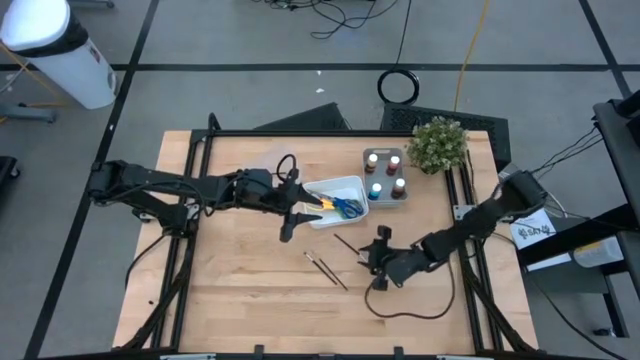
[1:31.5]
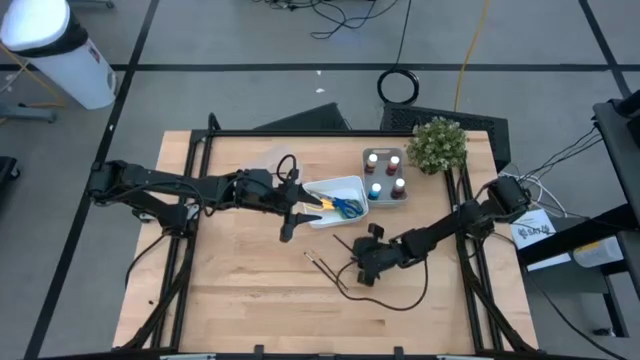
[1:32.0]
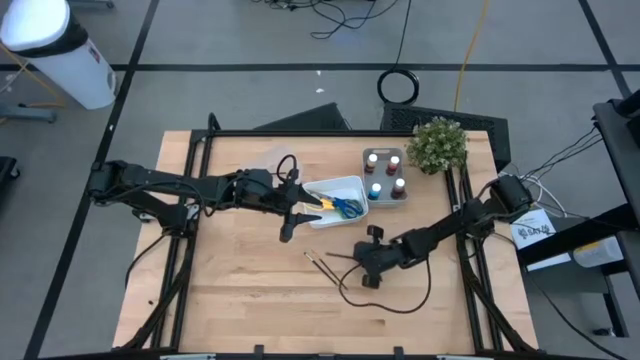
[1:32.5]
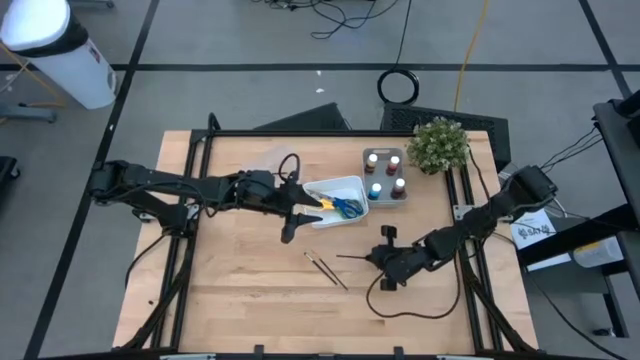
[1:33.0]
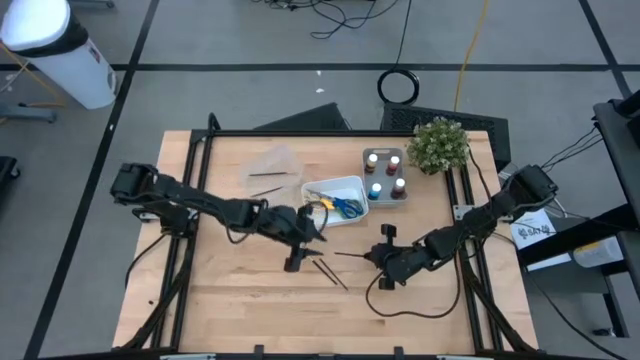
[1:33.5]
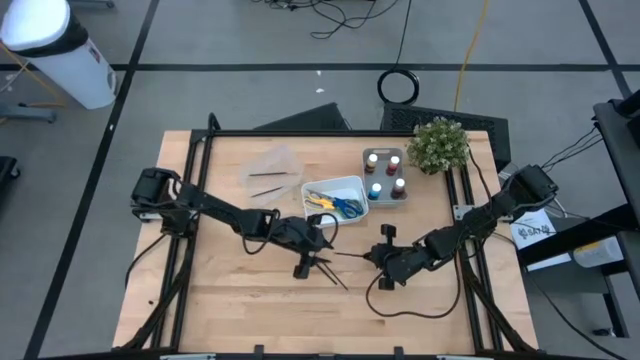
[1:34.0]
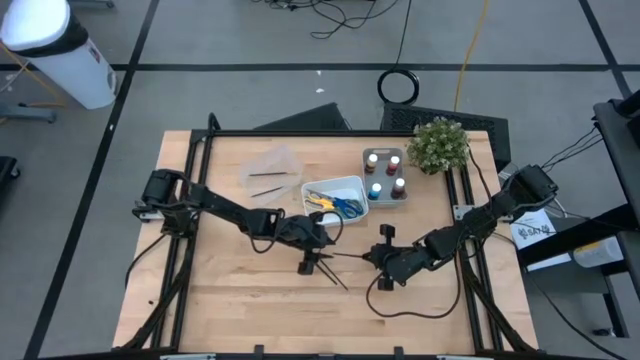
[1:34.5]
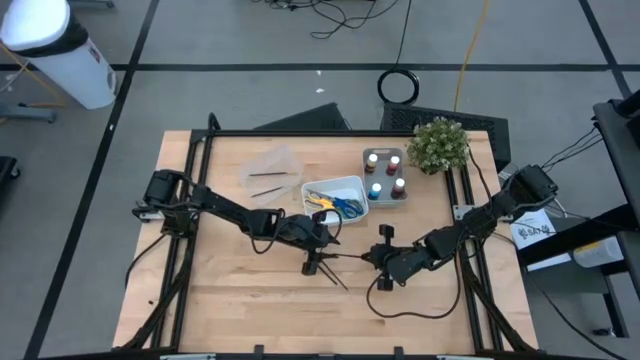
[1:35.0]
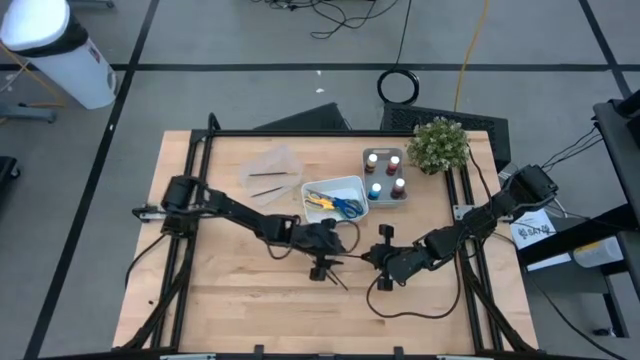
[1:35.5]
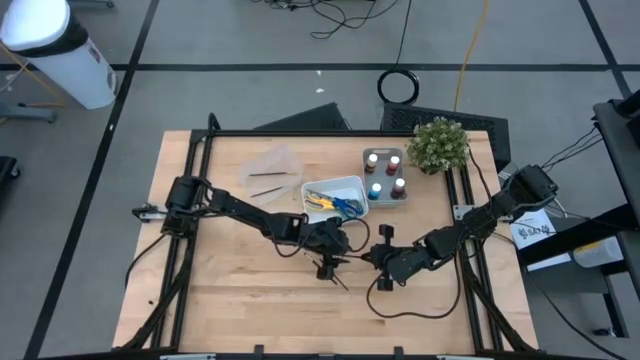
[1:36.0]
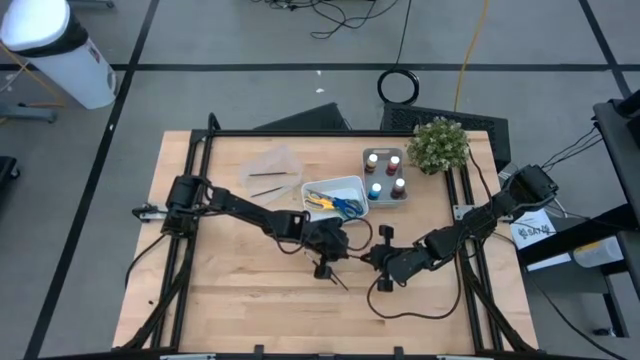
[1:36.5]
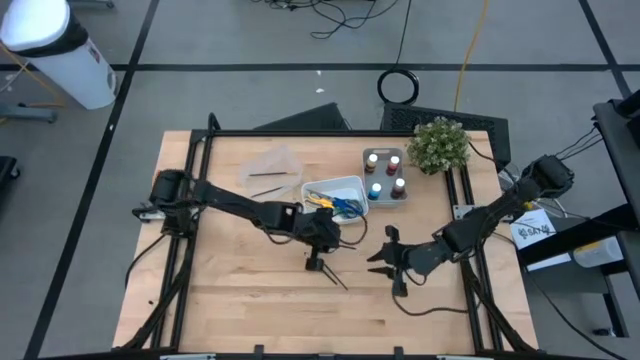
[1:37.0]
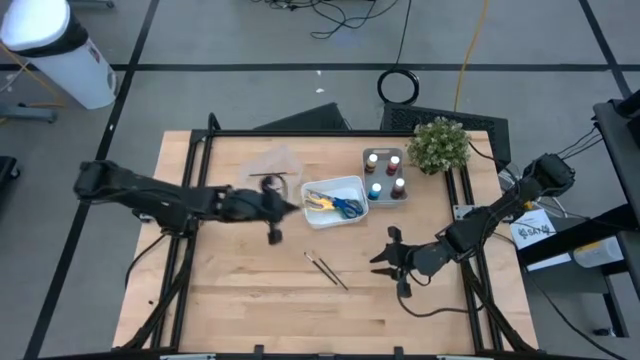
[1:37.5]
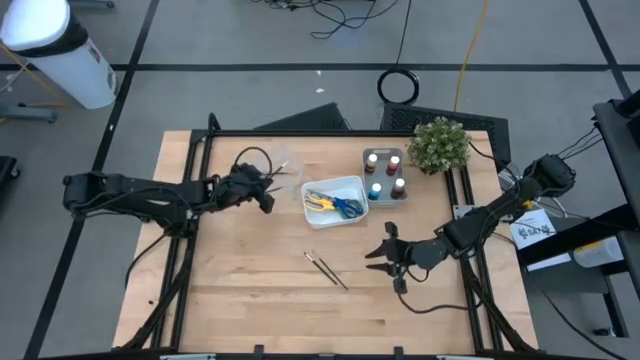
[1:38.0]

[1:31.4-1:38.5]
Task: Pick & Place Paint Supplies
Put the right silver paint brush in the transparent bin

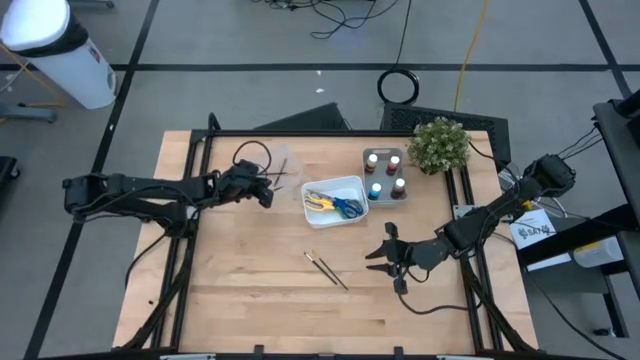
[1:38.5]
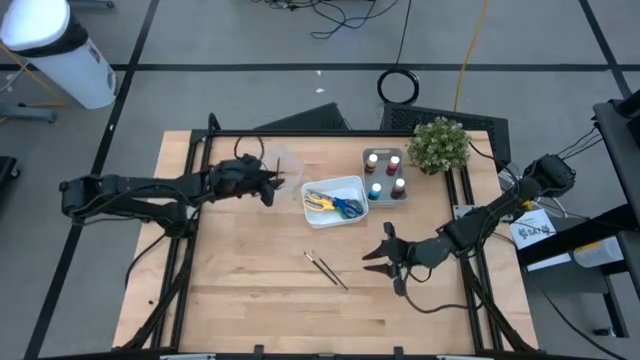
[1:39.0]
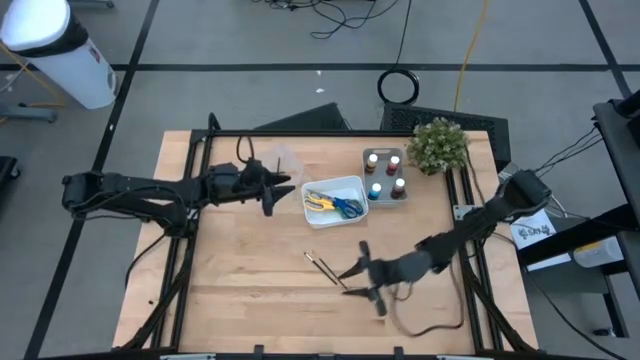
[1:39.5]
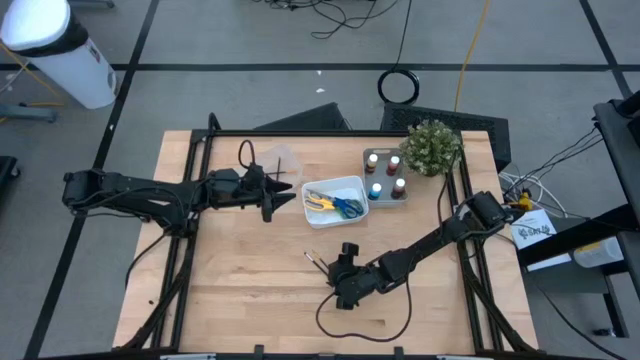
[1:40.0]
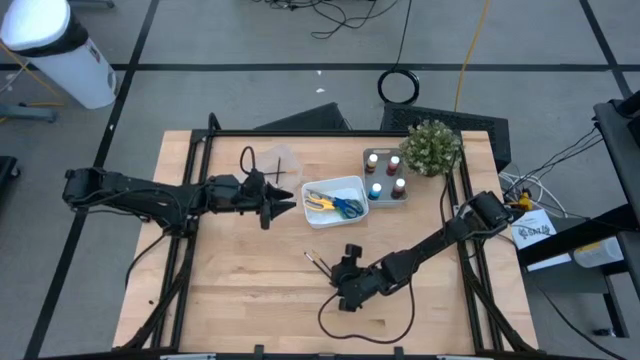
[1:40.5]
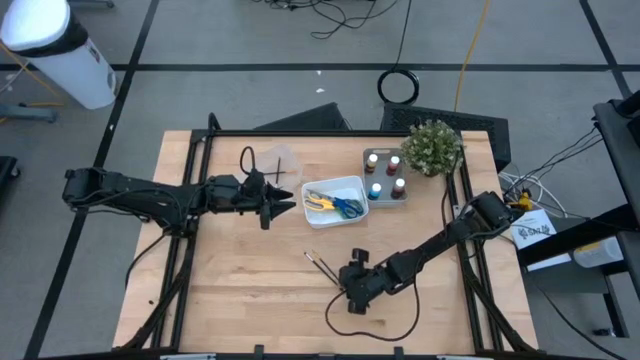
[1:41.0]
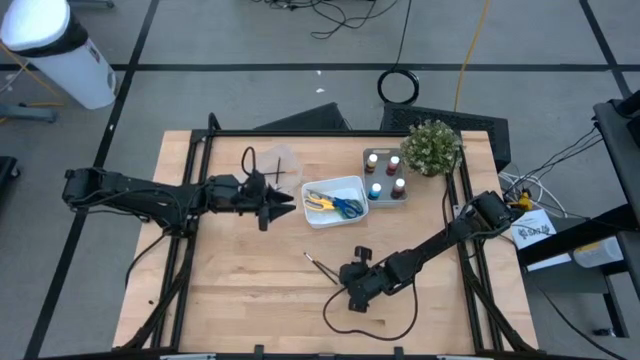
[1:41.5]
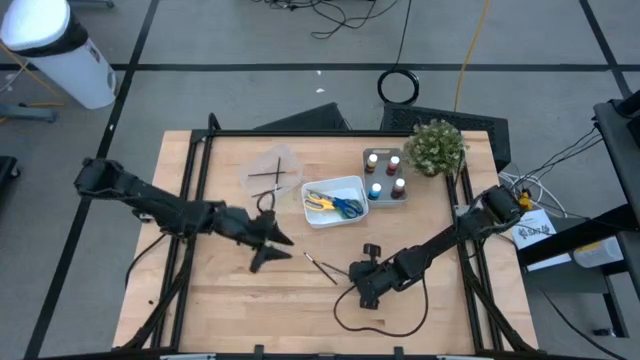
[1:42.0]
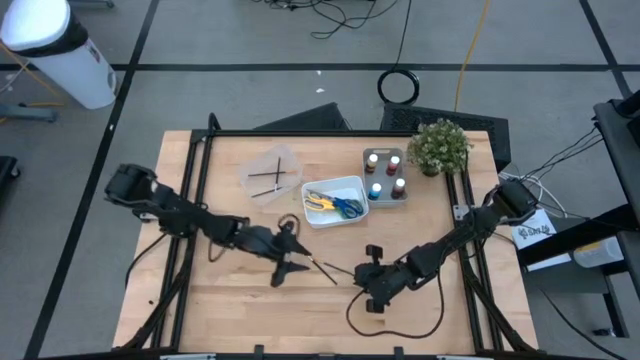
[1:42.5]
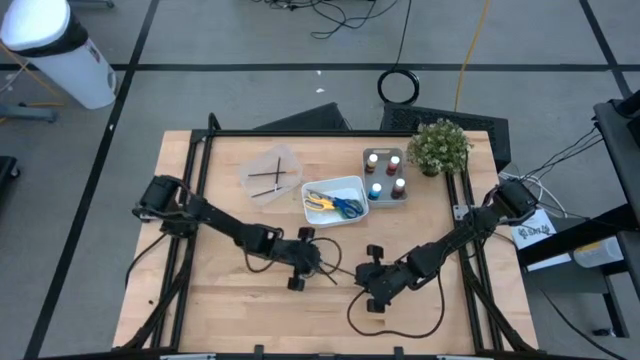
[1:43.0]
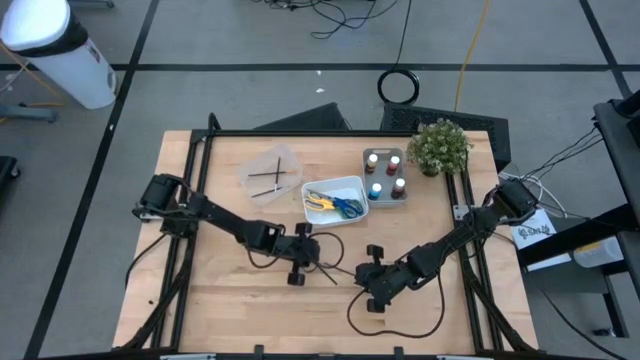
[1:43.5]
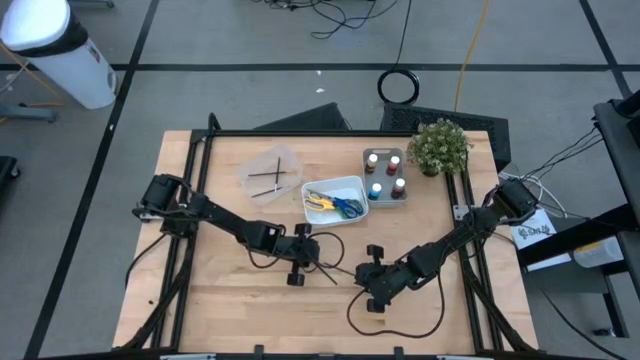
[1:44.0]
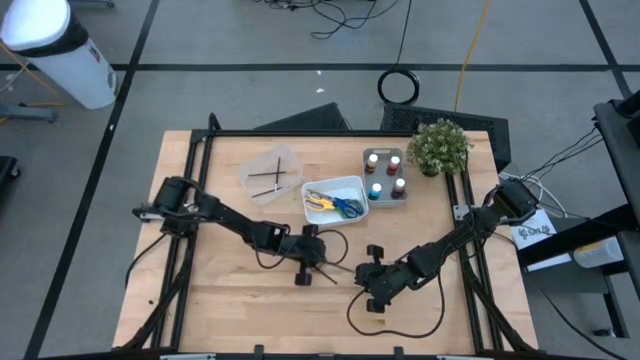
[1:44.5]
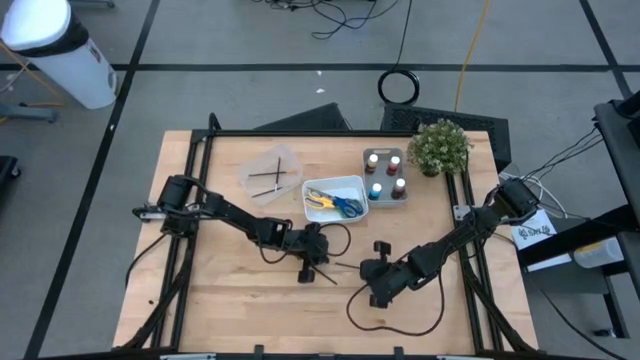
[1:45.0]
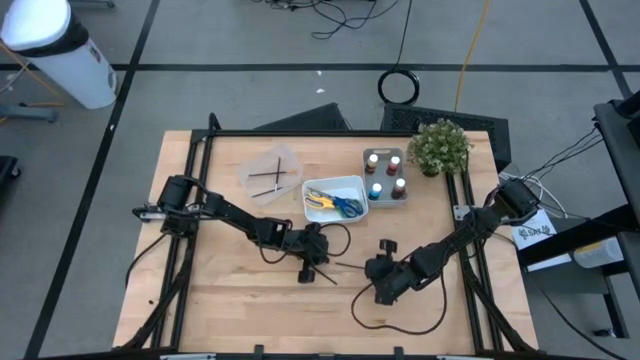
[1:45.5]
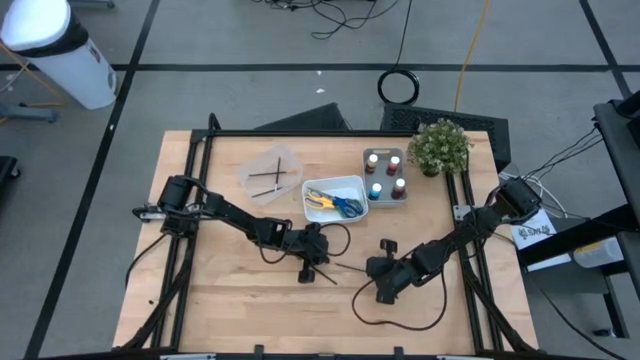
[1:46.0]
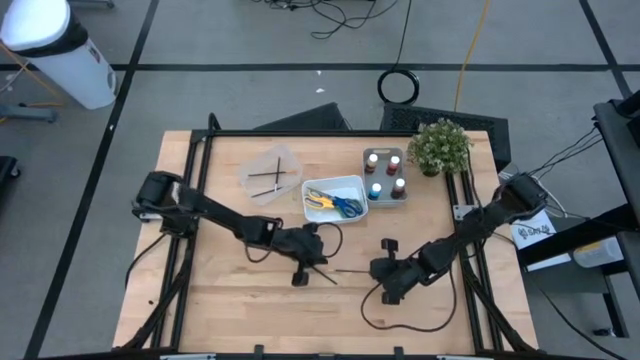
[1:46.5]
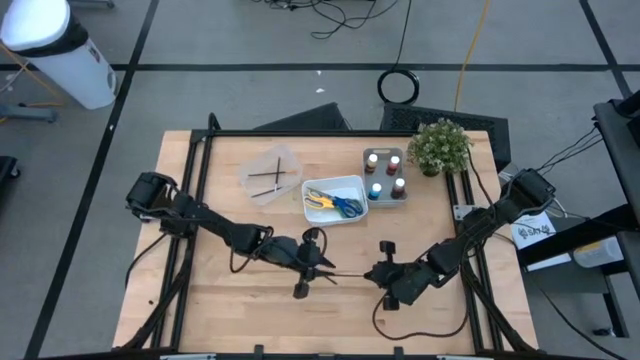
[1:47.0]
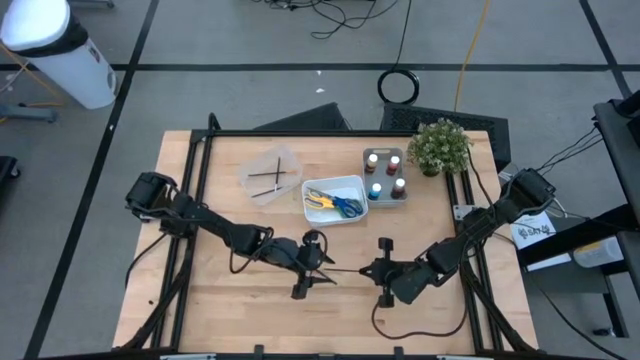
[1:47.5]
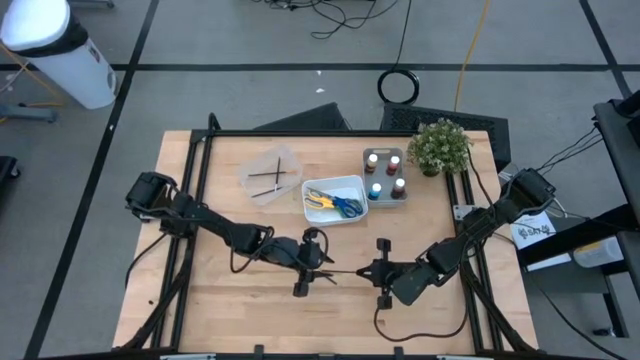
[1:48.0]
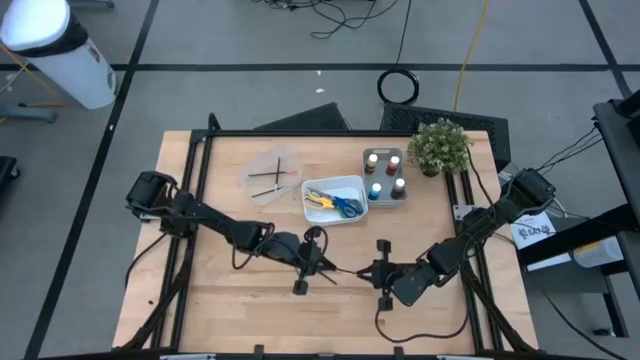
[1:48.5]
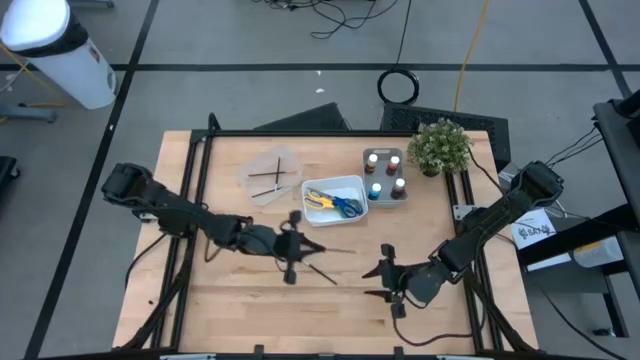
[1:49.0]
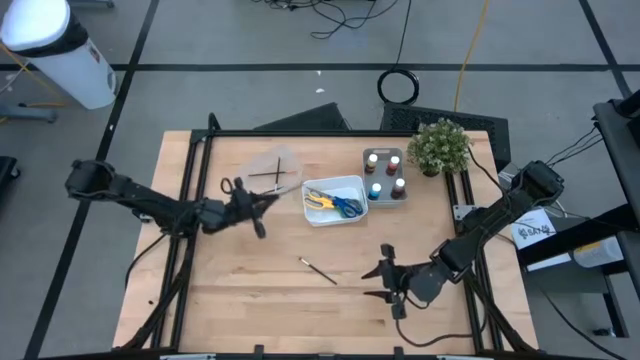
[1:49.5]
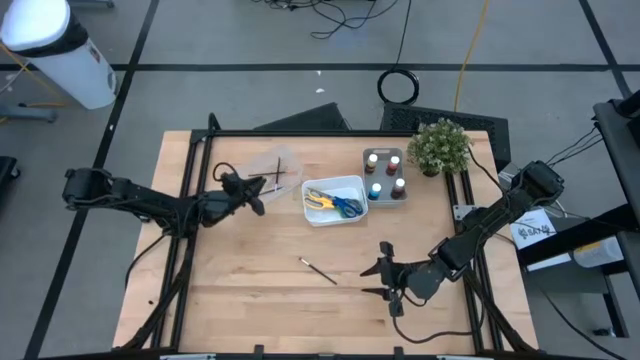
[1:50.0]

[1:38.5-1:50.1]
Put the gold paint brush in the transparent bin

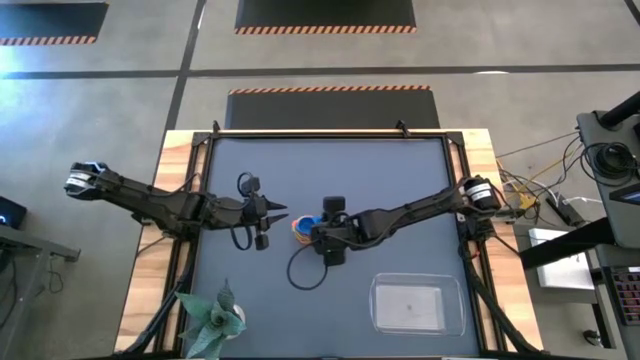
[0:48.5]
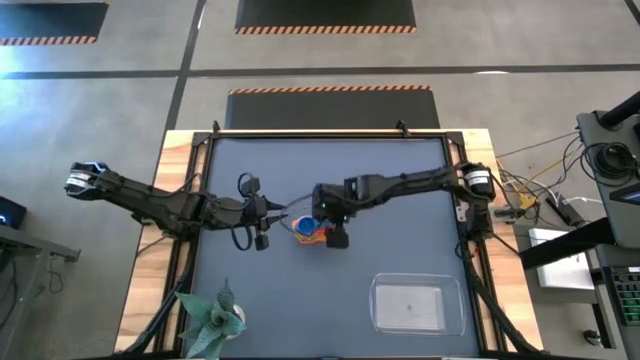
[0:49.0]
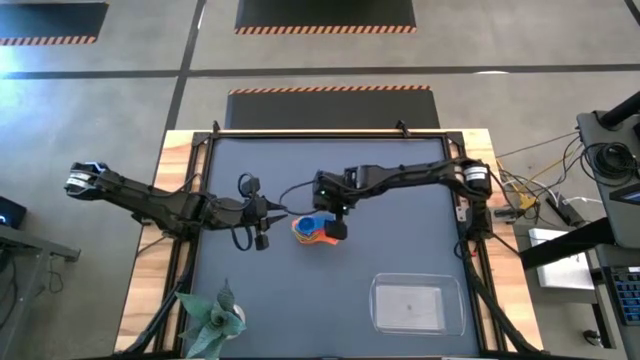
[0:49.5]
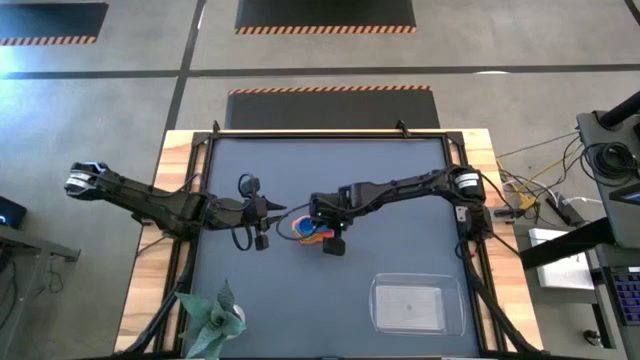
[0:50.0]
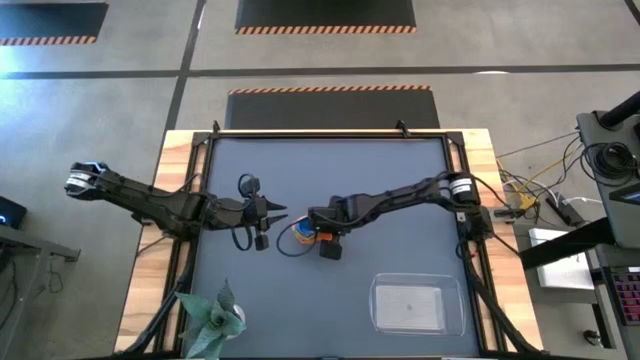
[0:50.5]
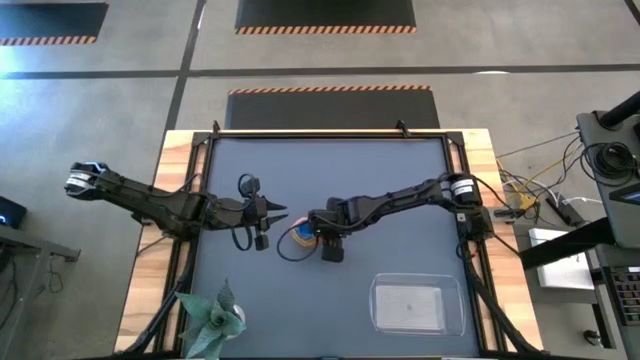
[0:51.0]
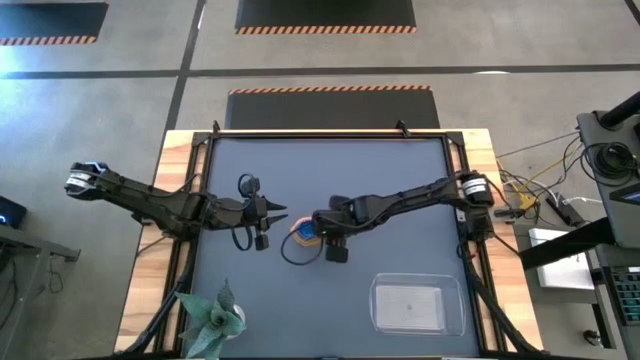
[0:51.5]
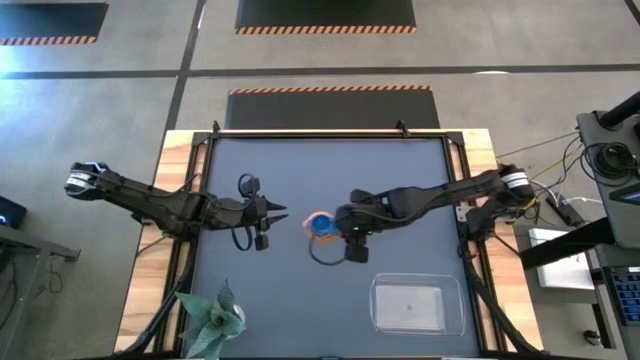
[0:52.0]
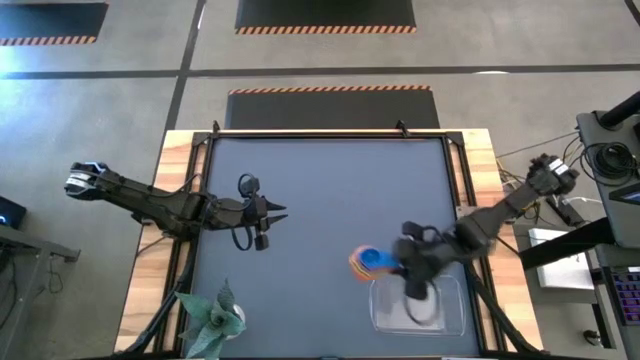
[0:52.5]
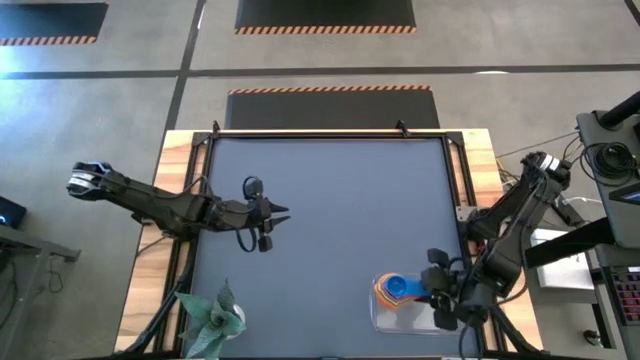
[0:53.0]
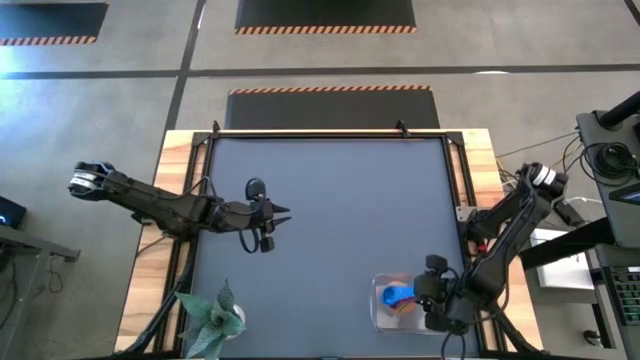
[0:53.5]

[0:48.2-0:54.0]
Task: Nest measuring cups in basket
Put the stacked measuring cups into the transparent bin
